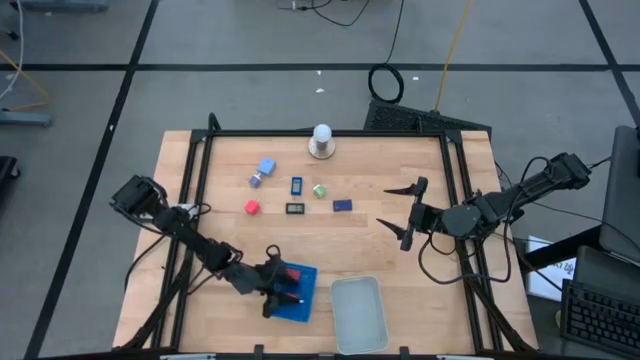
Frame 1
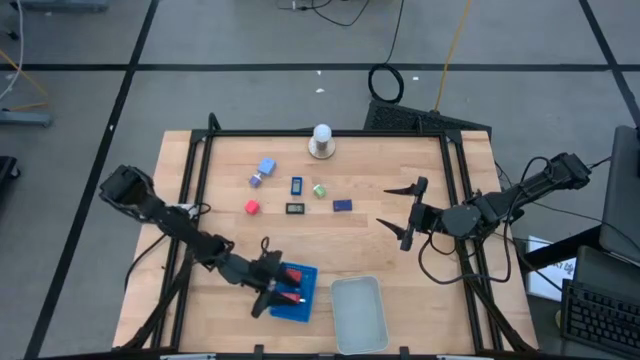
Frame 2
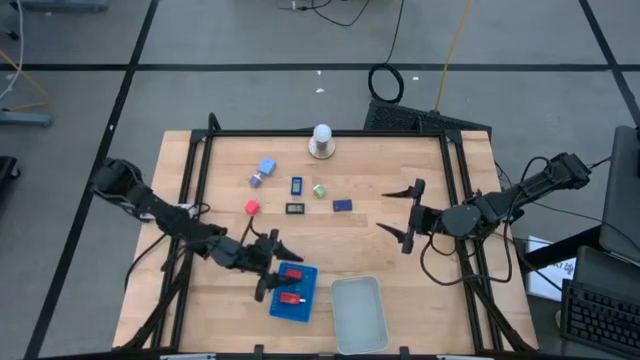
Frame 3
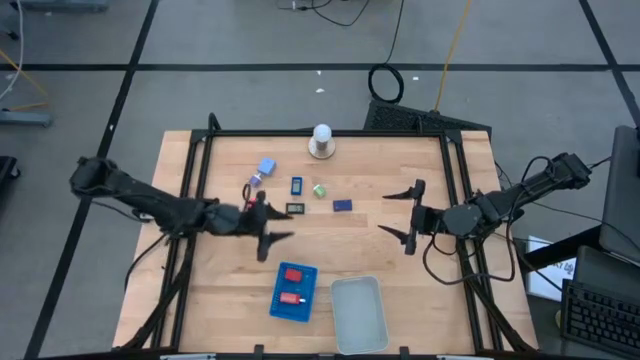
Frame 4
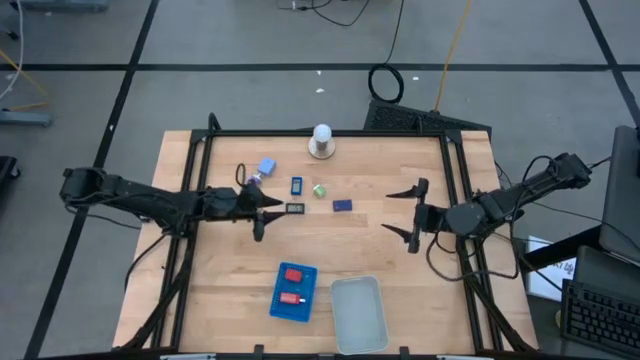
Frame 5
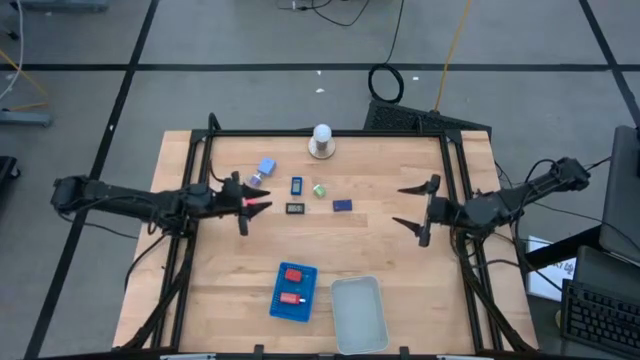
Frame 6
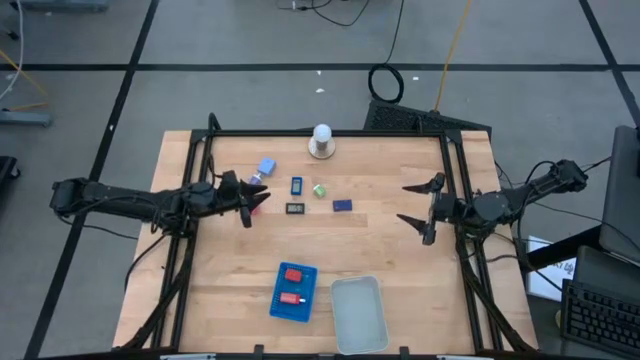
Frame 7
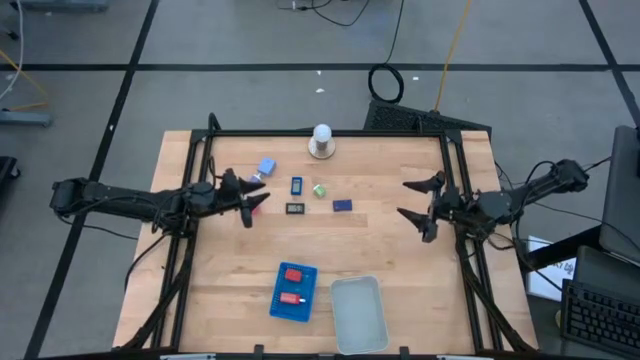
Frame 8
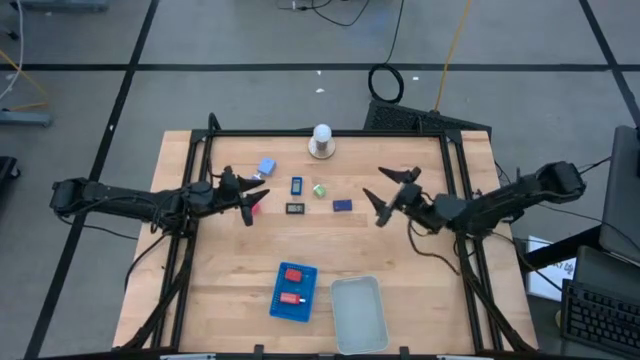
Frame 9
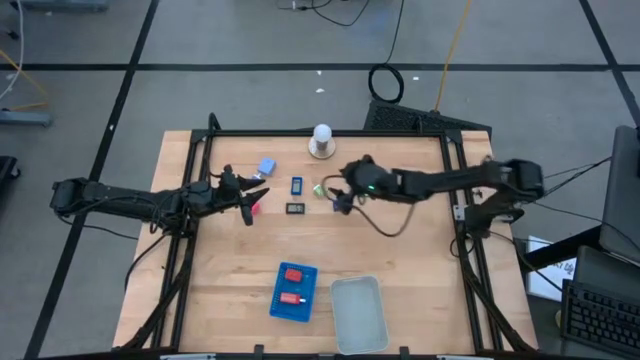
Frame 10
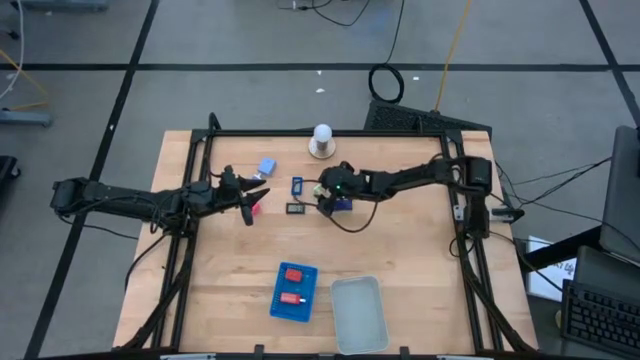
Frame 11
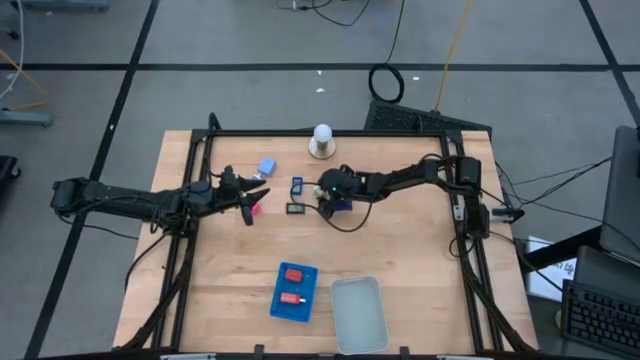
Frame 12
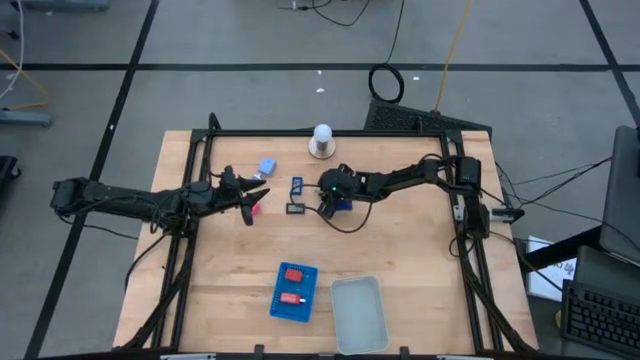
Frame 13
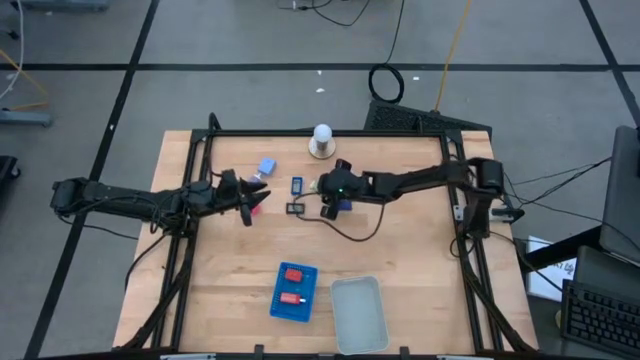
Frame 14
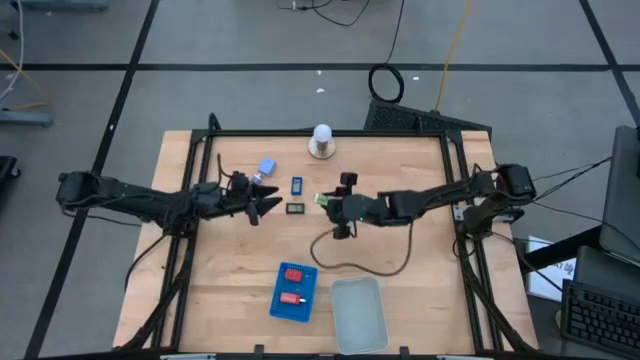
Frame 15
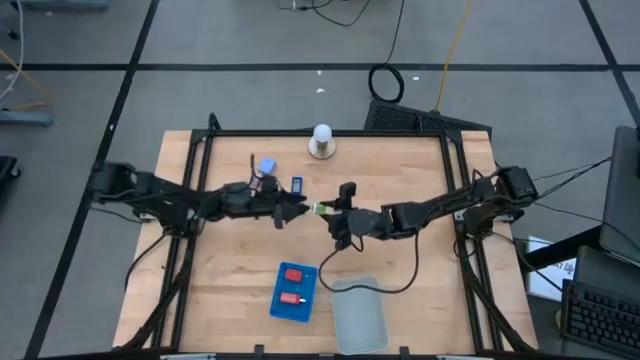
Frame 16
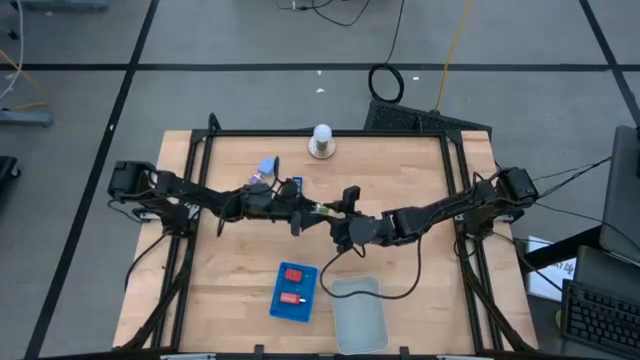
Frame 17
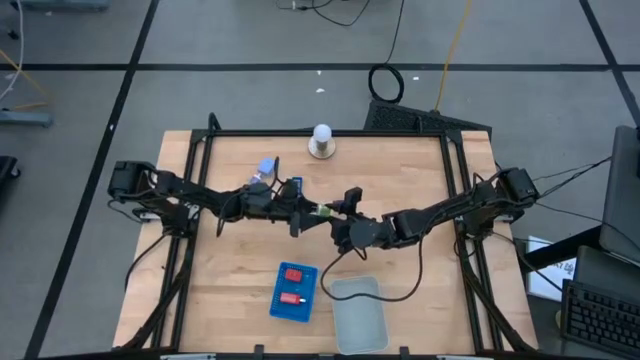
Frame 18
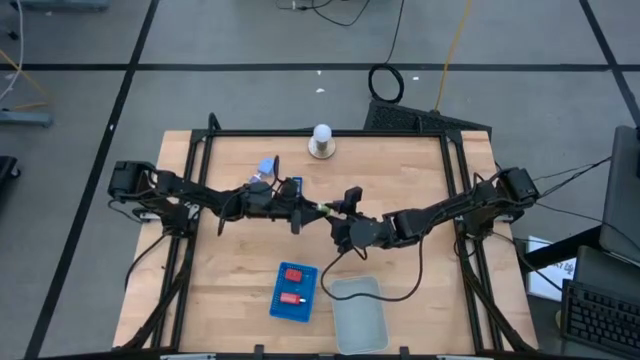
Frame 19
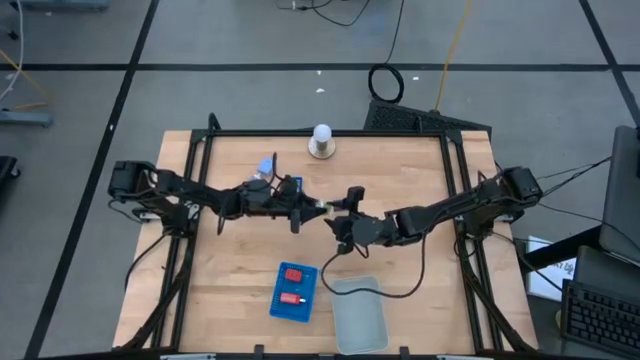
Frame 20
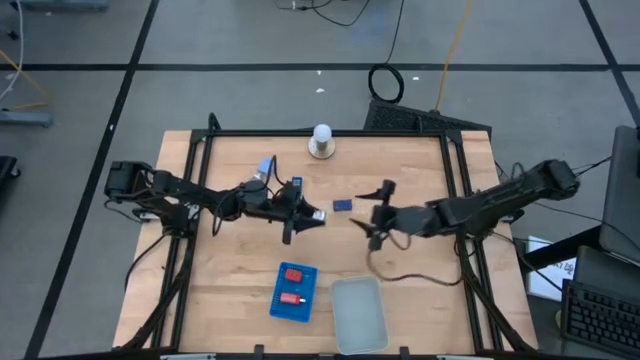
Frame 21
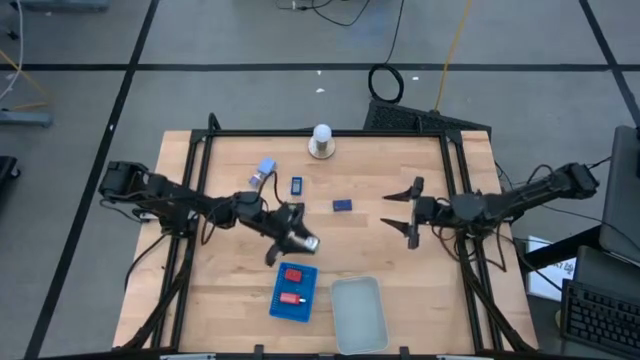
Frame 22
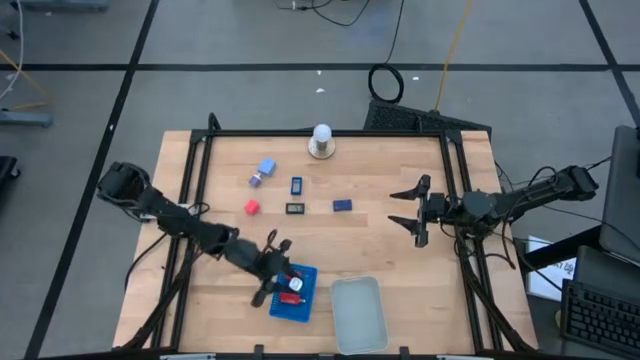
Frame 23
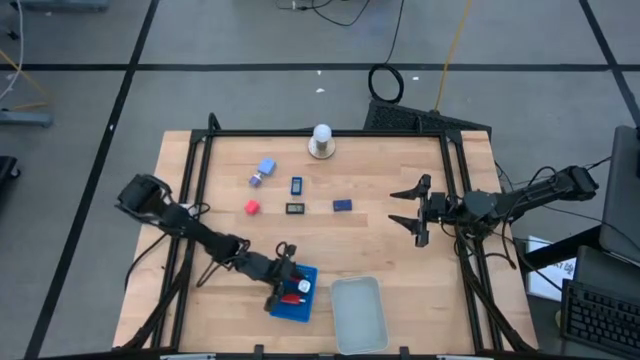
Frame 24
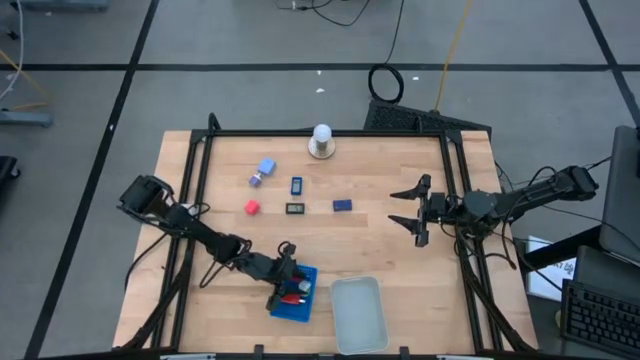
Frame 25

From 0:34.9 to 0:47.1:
Task: Pick & Place Office items
Put the green charger adapter into the blue bin

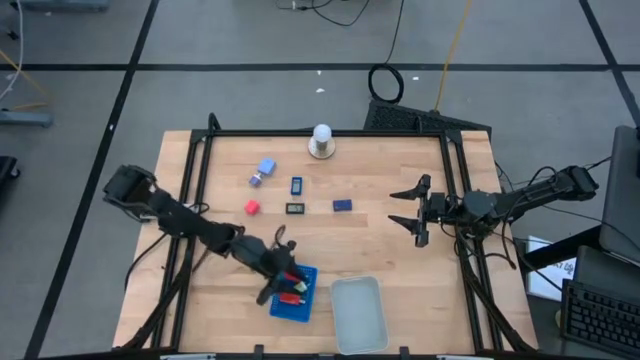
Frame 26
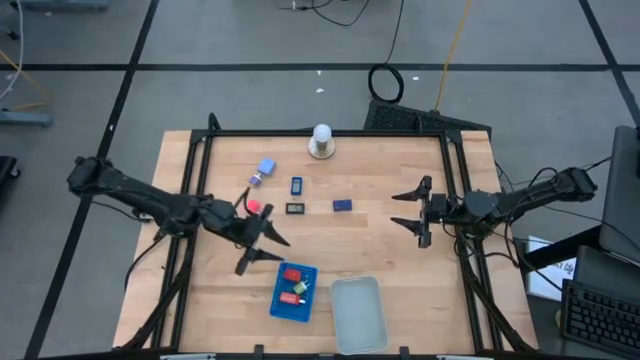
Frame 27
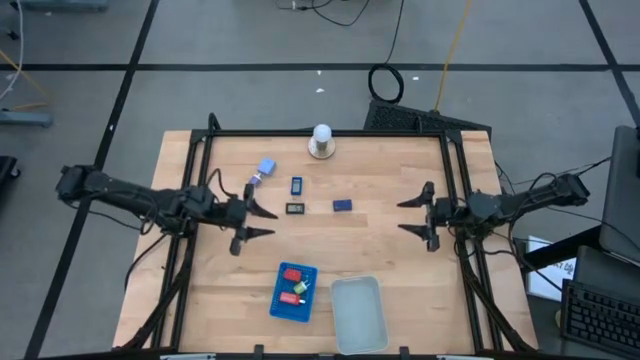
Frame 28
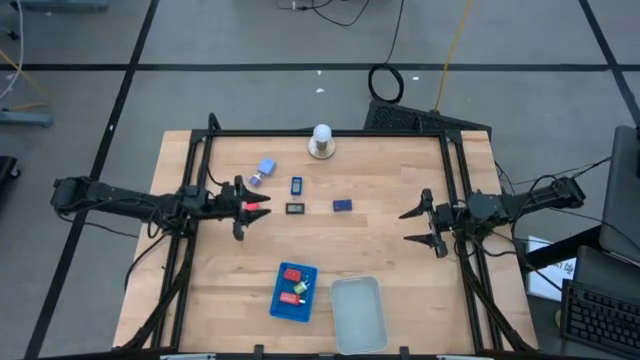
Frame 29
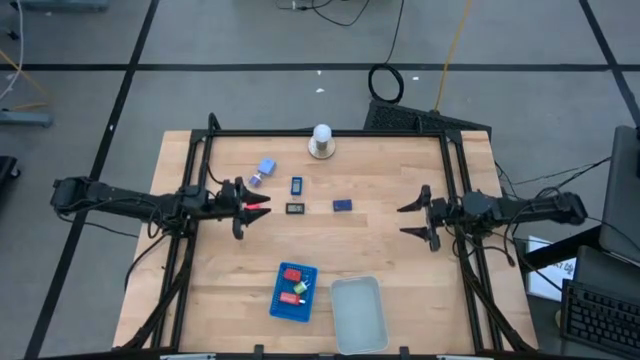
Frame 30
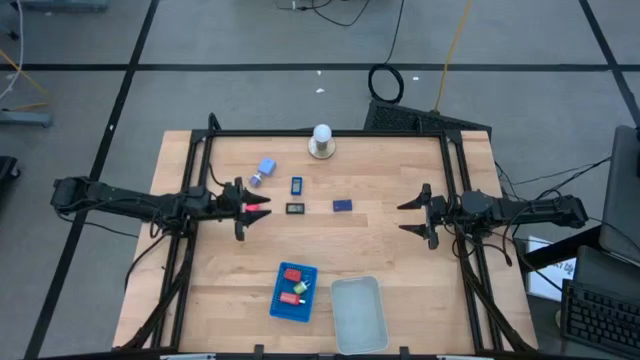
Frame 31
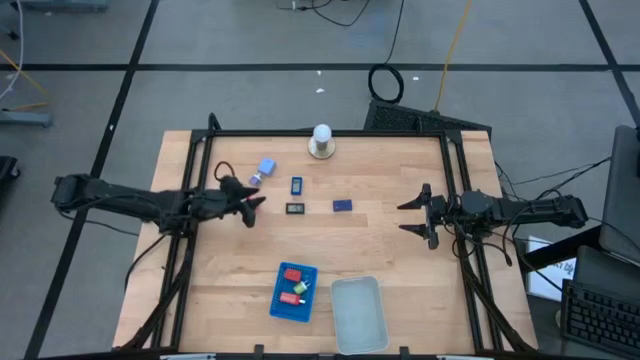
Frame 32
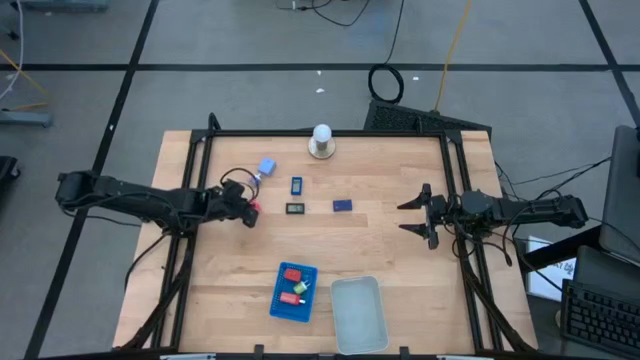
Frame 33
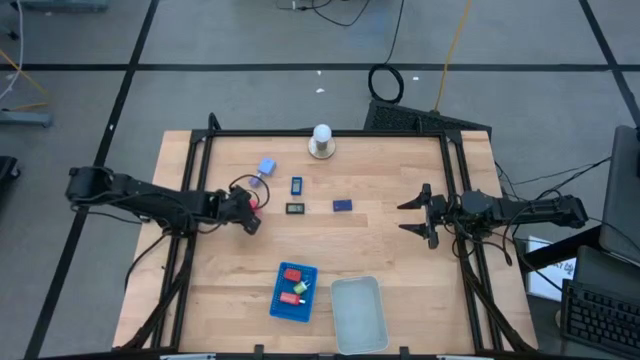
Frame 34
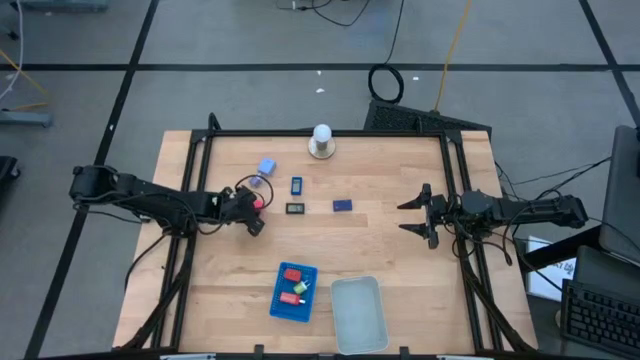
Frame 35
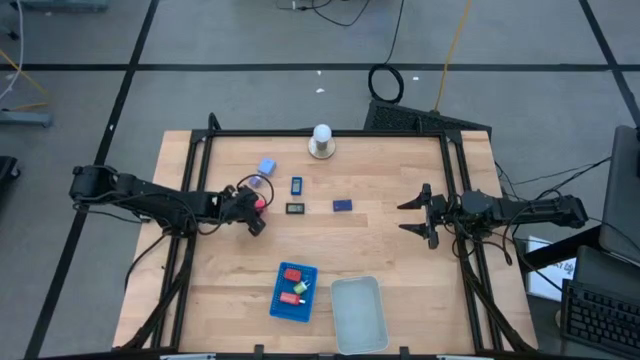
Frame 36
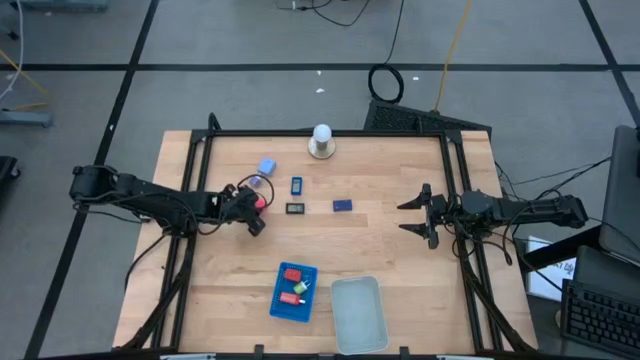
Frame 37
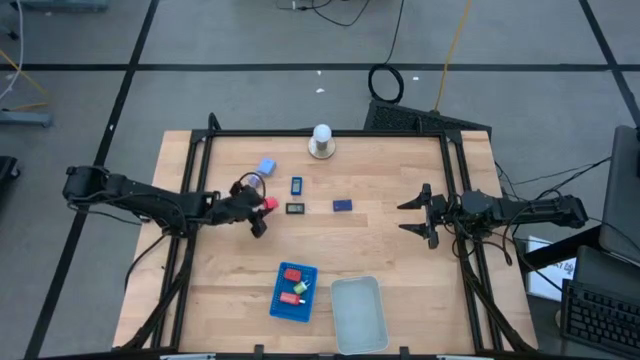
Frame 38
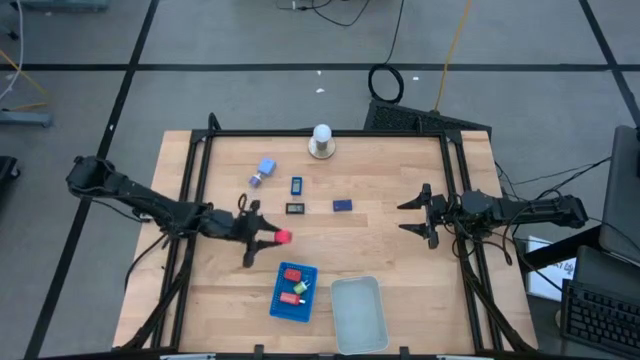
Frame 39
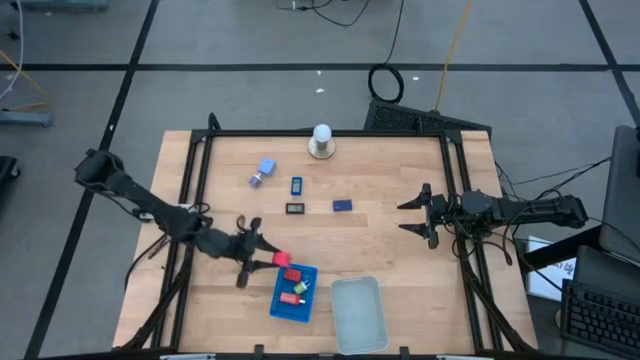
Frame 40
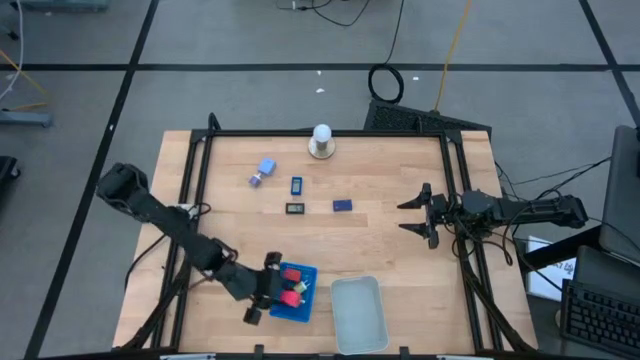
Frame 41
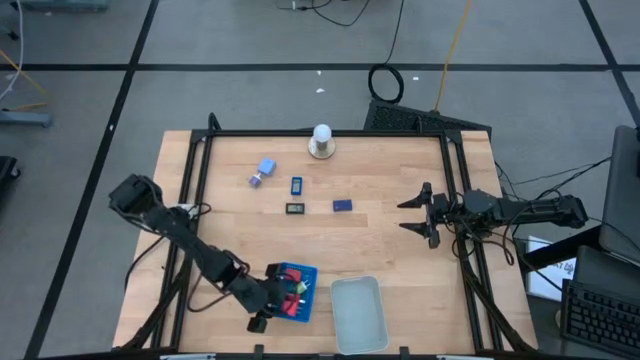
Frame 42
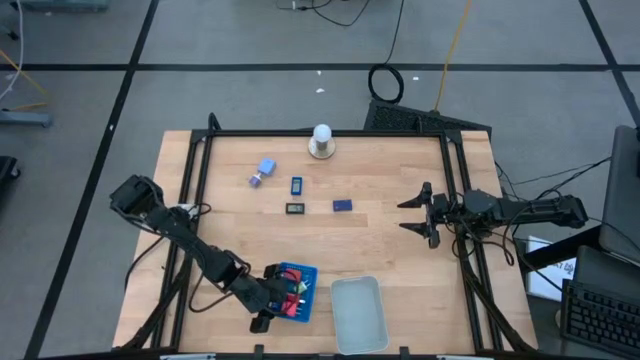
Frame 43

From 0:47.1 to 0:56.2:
Put the pink charger adapter into the blue bin

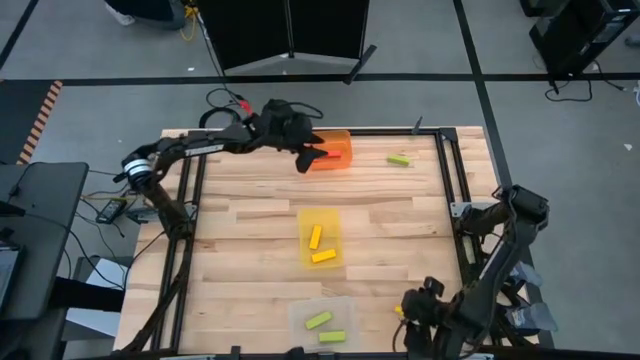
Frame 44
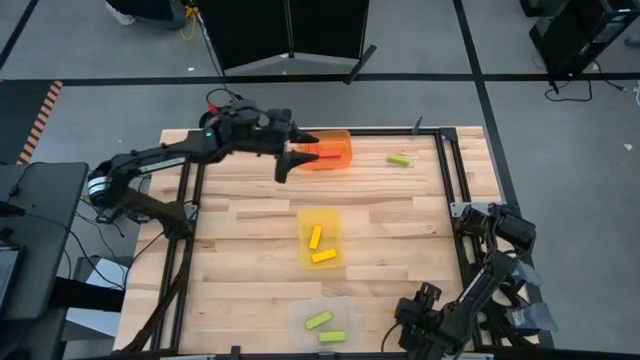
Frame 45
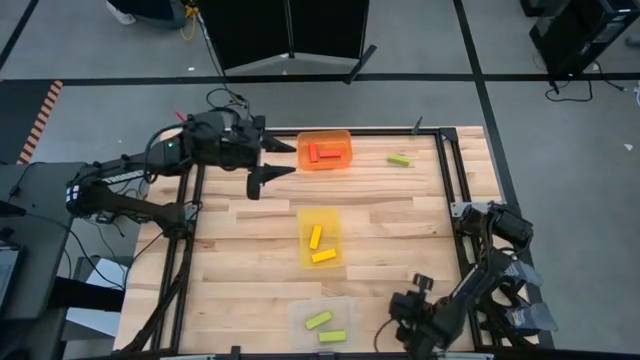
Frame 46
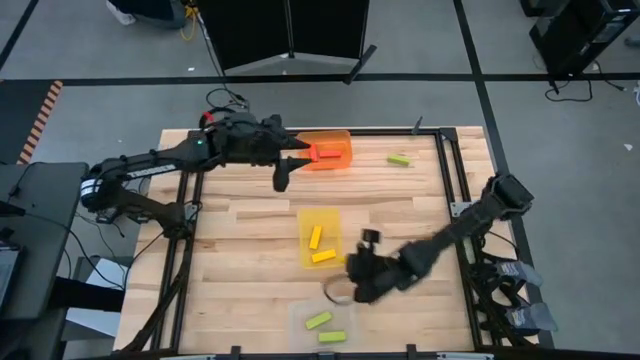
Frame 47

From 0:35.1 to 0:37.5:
Task: Sort blocks
Put the yellow block into the yellow bin
